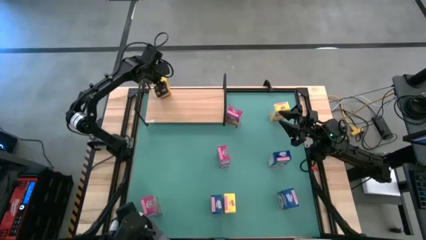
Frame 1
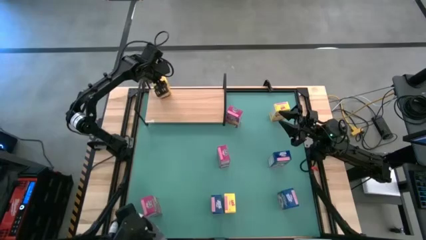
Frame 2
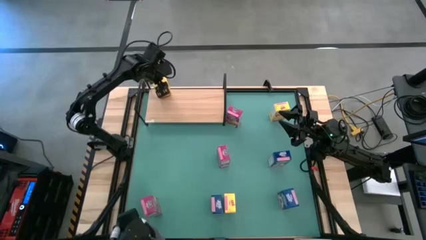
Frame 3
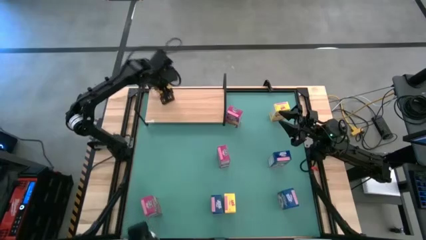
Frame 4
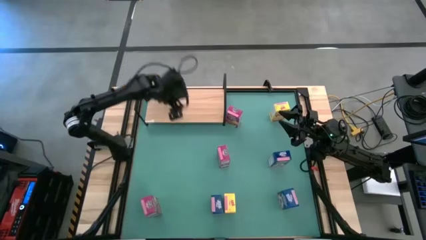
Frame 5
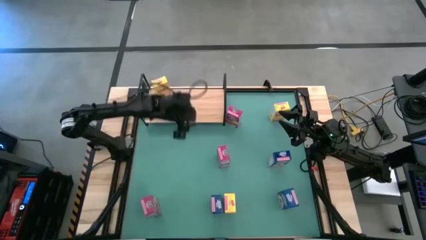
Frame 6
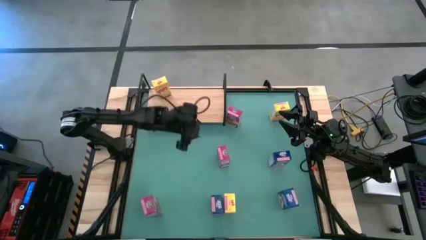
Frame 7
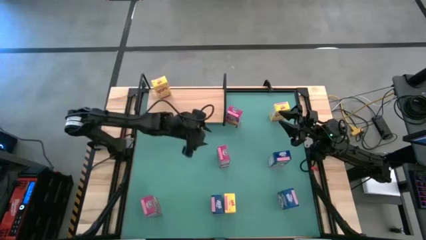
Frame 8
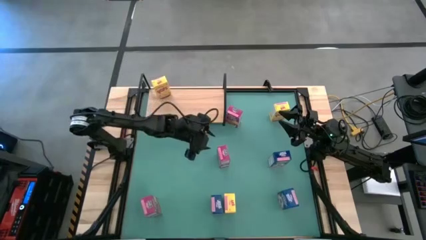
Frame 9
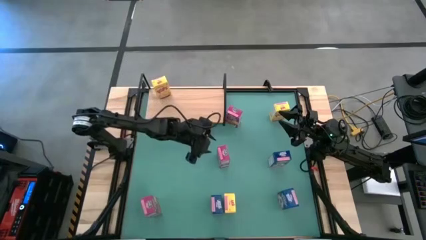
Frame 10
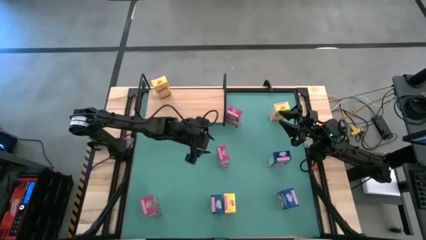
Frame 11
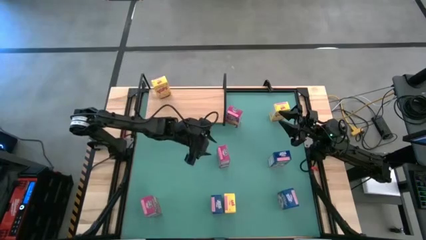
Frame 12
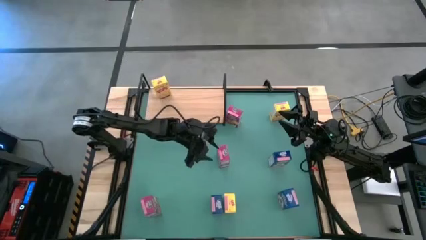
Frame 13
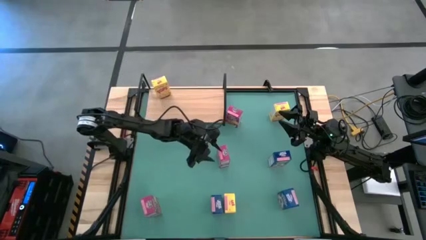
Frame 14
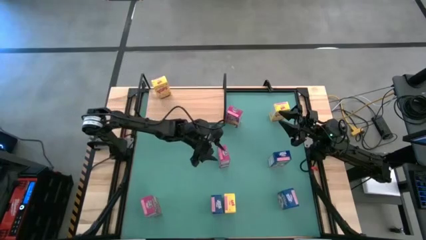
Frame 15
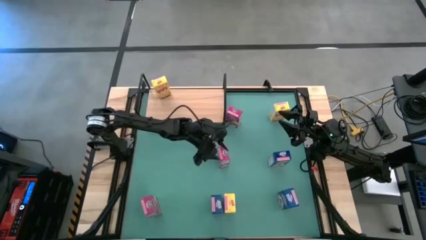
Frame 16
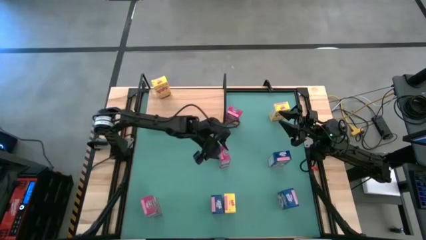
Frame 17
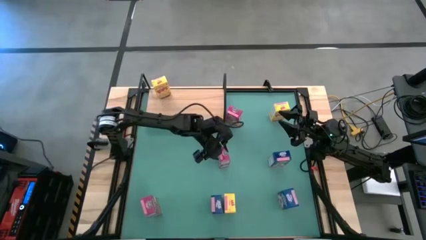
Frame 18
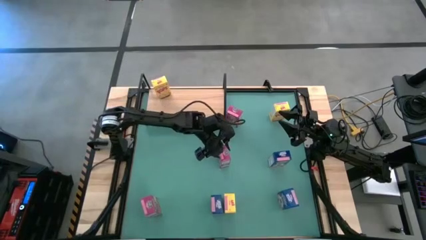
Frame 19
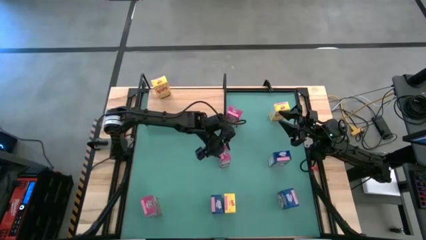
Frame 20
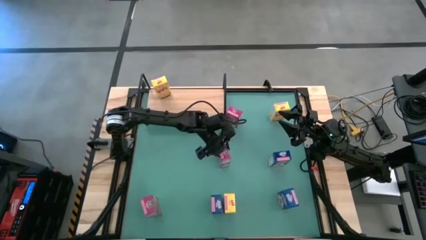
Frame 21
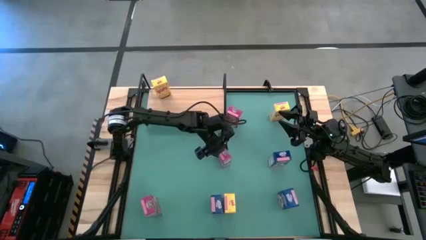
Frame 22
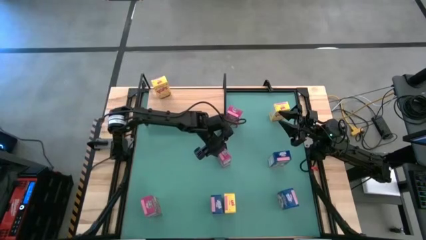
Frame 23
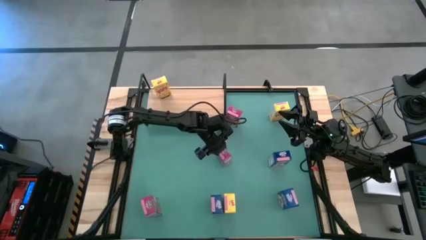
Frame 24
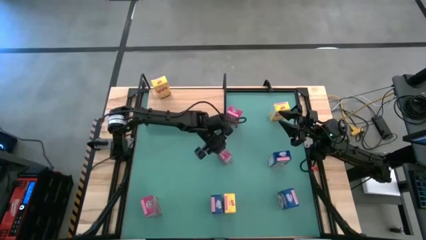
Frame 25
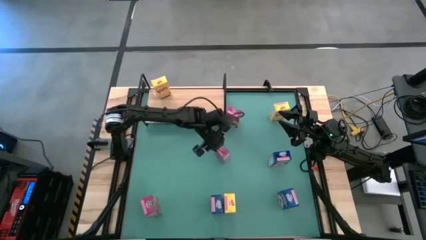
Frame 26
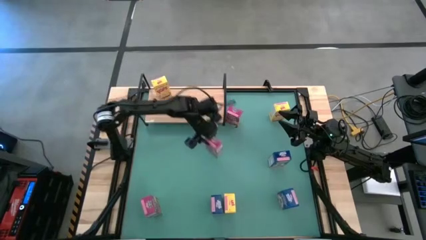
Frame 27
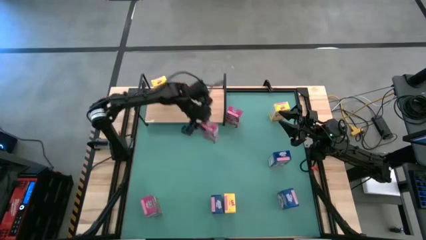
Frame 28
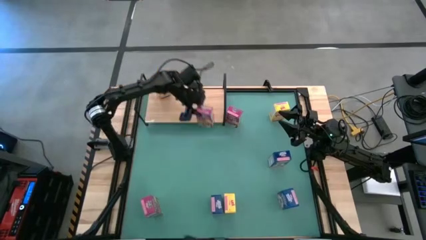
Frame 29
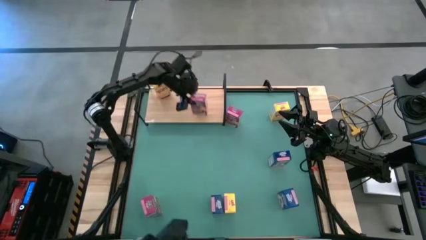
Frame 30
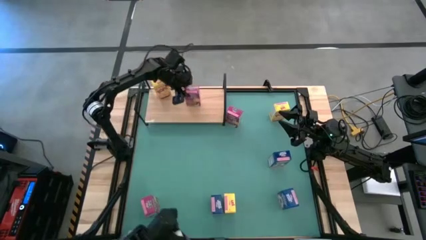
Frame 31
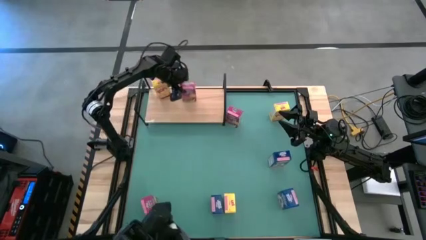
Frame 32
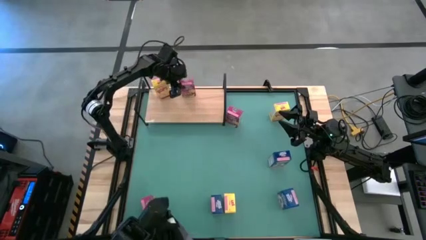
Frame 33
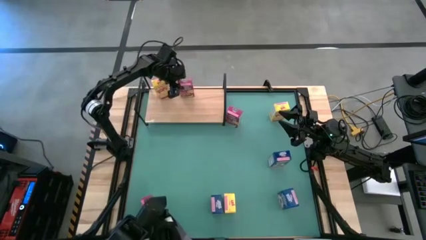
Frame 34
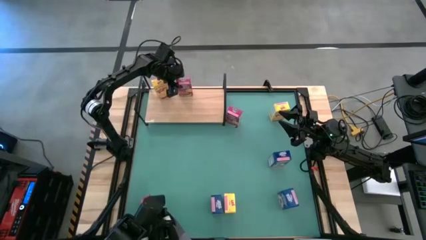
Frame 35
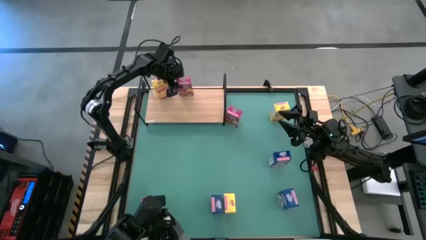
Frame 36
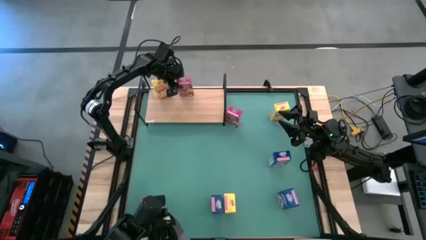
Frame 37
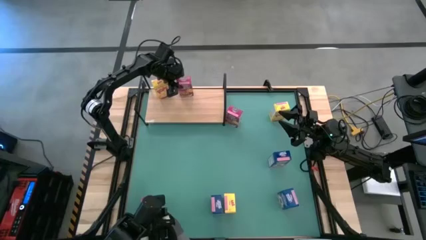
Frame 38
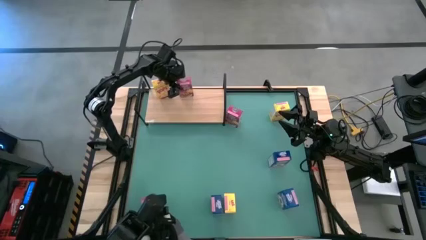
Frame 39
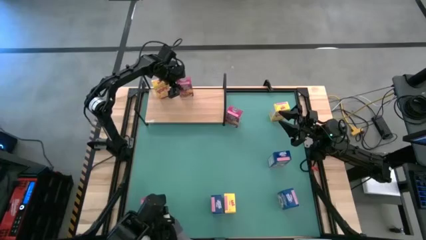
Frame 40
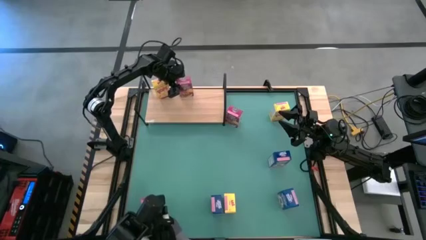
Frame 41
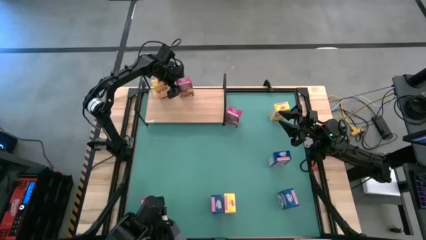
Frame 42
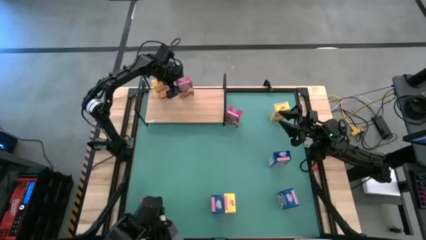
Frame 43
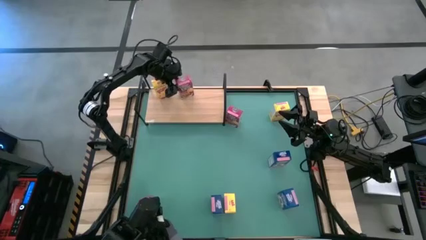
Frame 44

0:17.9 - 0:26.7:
Task: Stack cereal on shelf
Put the middle pink cereal box on the shelf

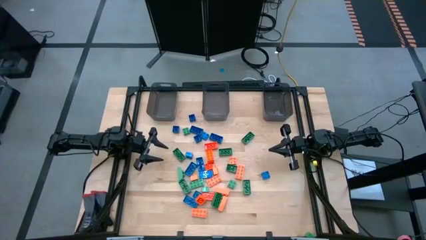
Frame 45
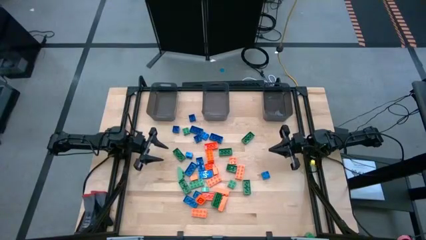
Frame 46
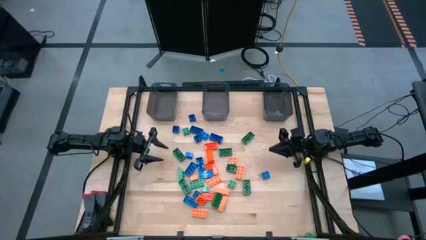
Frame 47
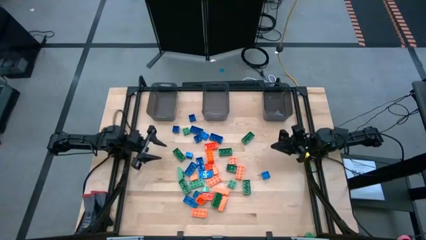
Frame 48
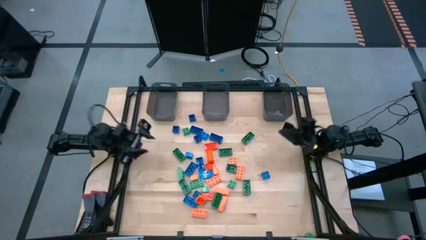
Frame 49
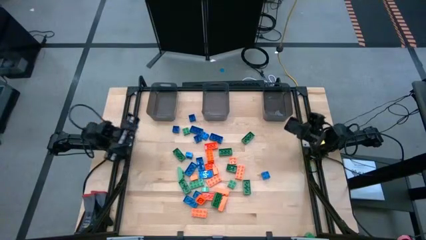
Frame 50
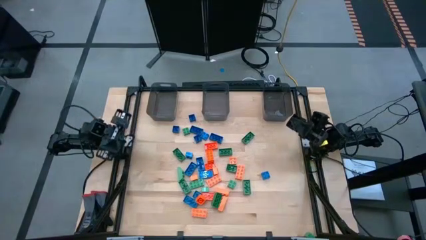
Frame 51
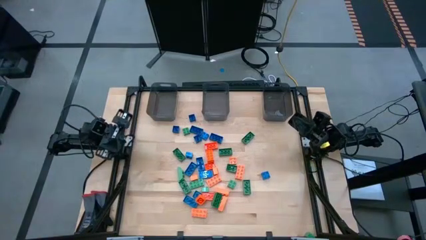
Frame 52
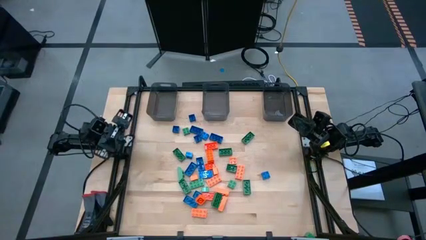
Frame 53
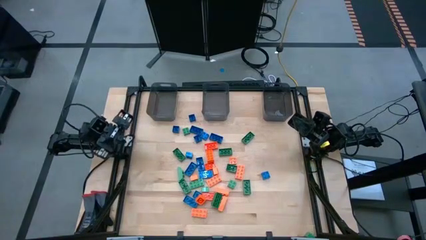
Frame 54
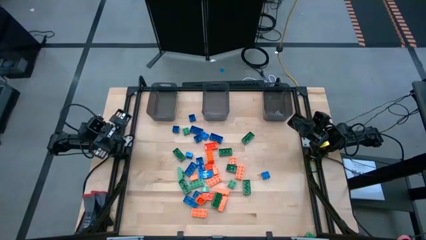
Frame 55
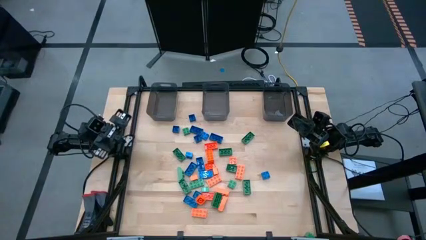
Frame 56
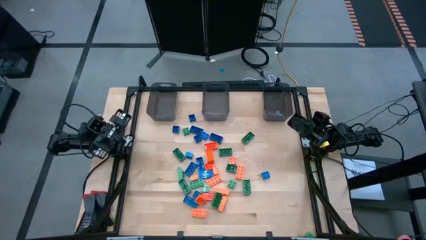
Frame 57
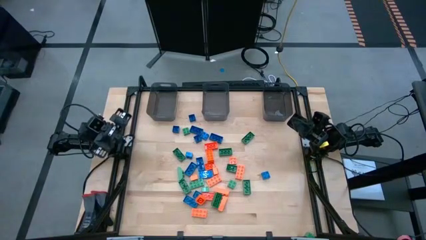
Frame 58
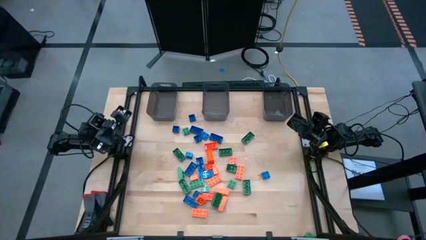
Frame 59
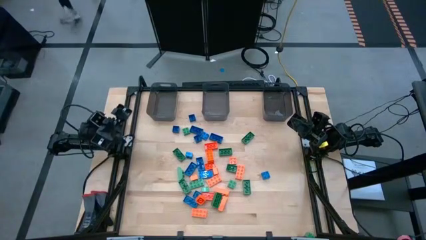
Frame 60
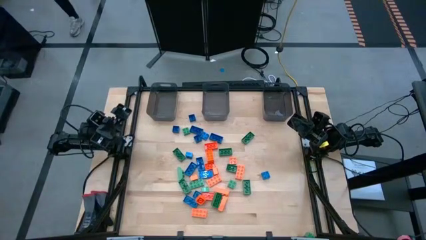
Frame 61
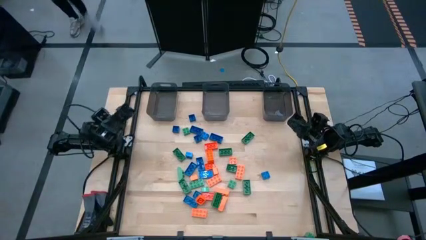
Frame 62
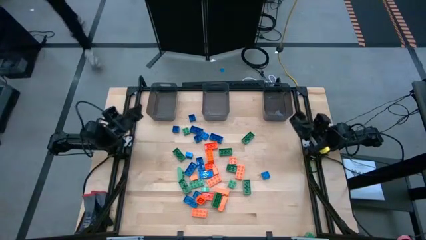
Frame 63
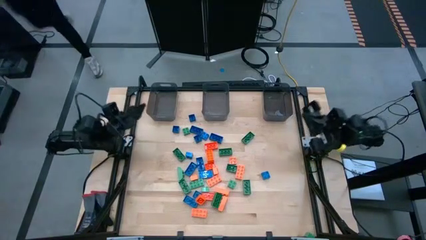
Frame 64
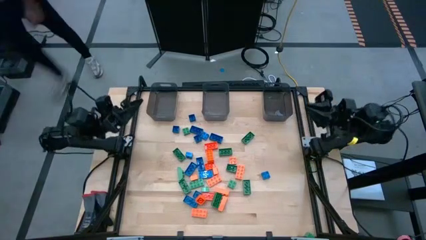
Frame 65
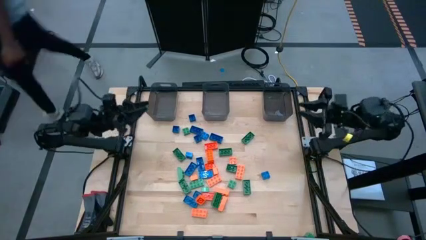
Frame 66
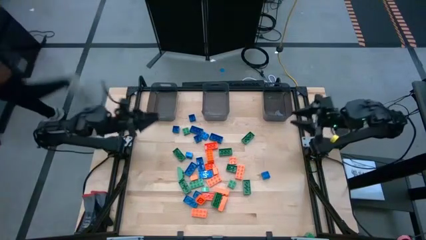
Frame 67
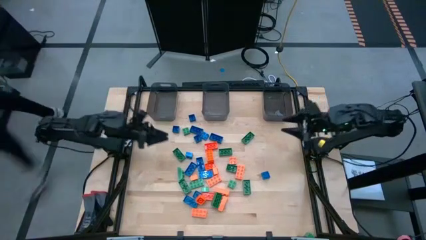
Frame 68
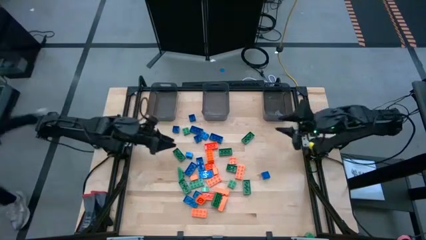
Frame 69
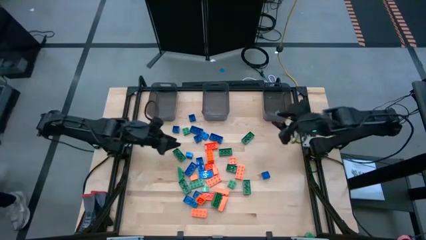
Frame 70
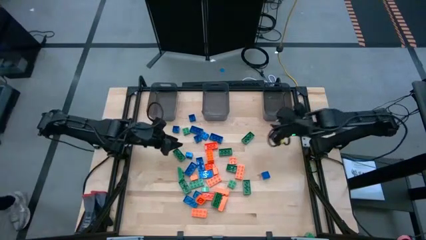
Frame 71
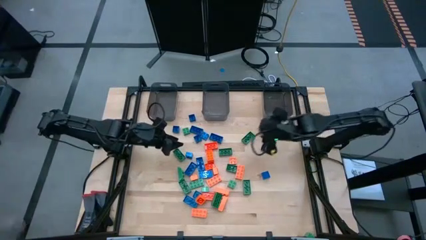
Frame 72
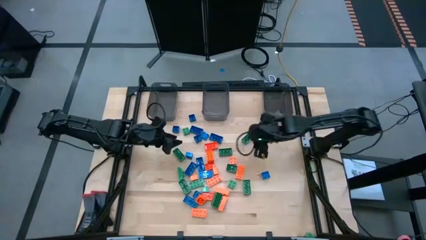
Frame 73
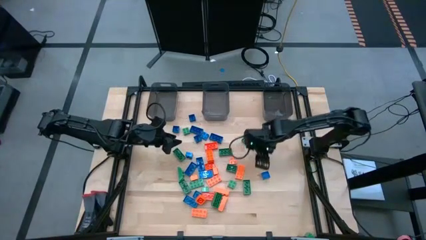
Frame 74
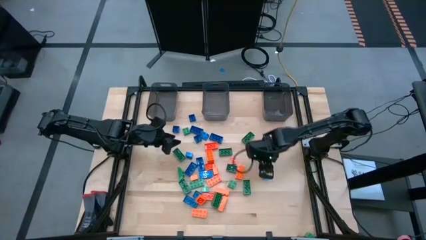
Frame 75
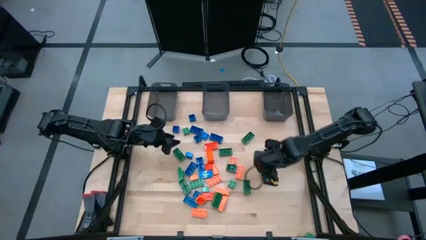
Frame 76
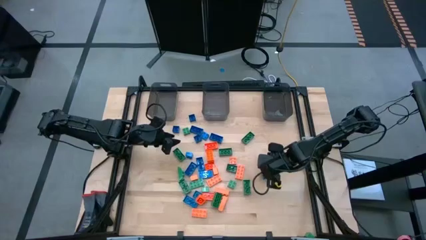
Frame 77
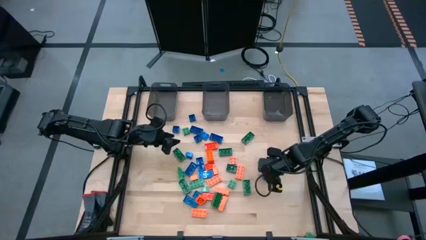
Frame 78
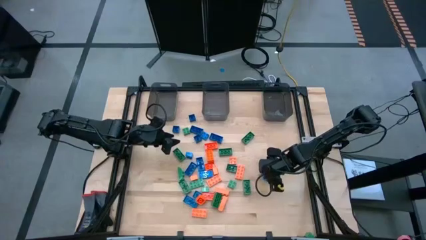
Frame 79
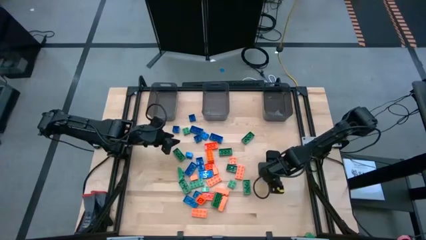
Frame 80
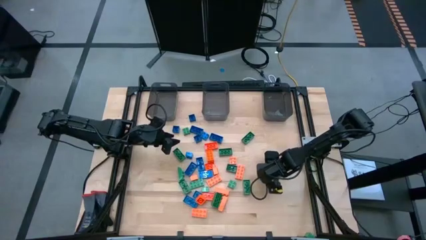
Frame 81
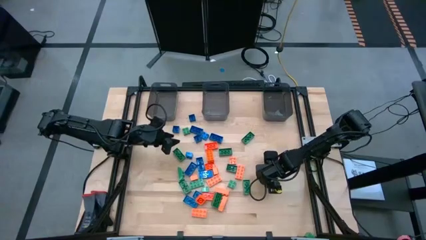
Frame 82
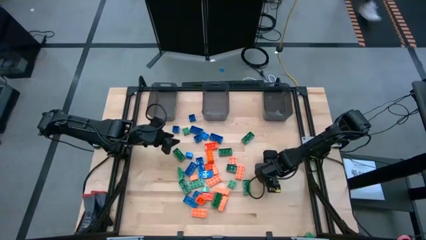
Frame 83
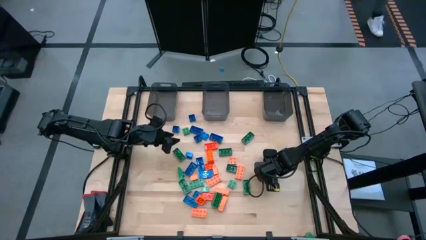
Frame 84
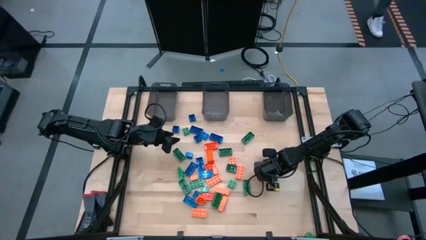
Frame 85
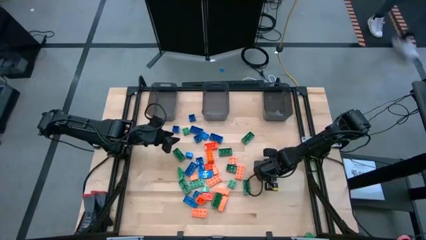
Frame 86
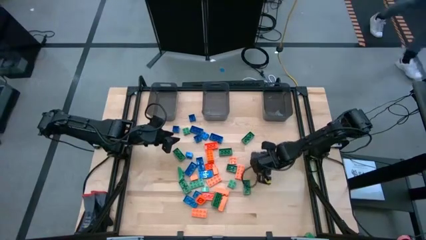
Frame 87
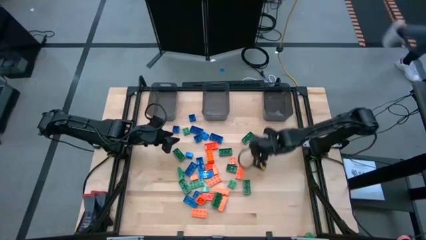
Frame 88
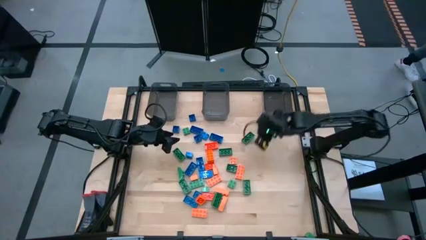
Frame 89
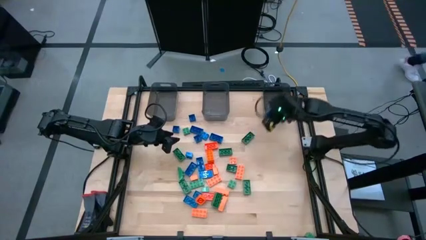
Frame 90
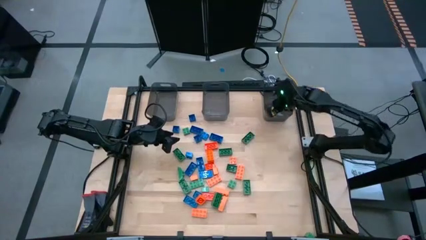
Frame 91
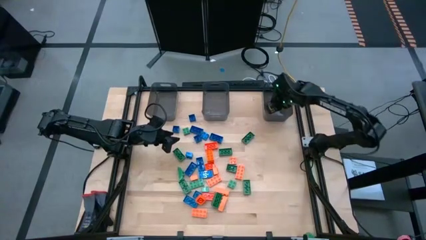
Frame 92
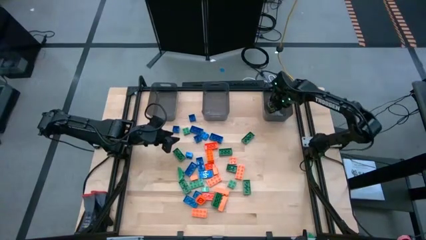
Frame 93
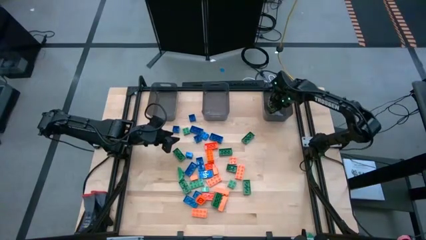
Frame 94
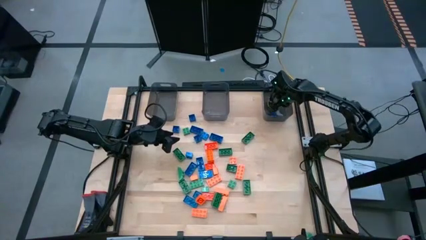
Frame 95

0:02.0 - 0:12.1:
Task: Sort blocks
Put the blue game piece into the right black bin
